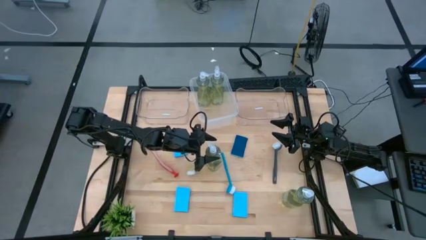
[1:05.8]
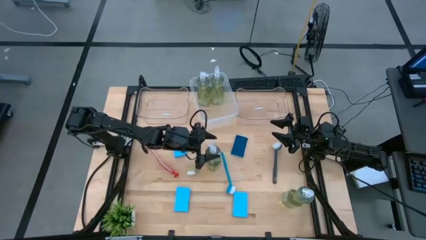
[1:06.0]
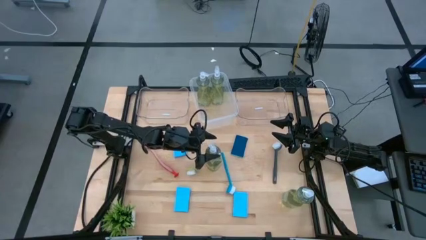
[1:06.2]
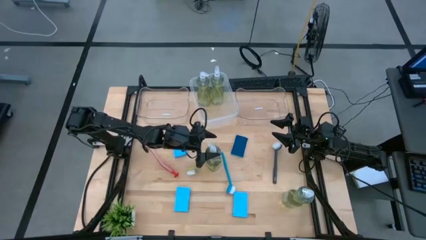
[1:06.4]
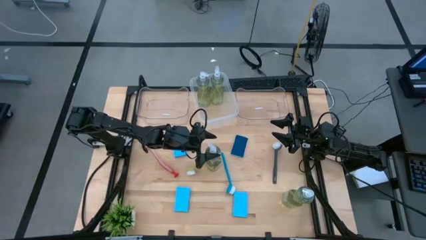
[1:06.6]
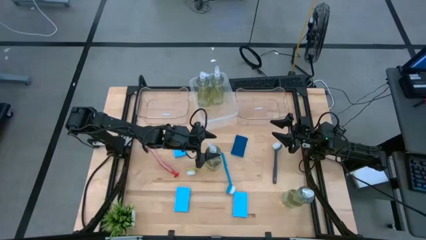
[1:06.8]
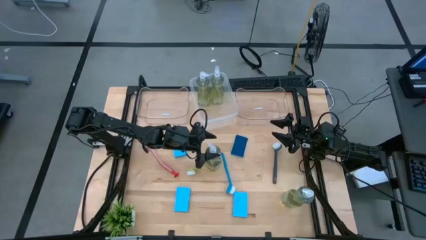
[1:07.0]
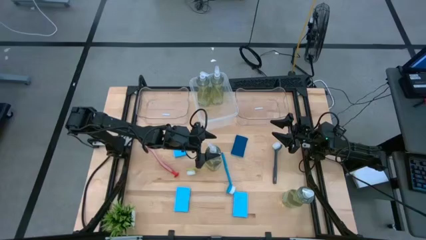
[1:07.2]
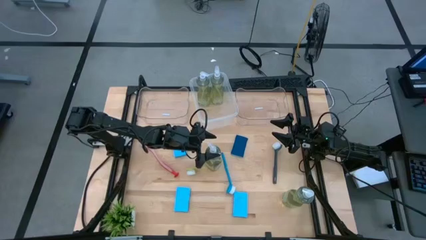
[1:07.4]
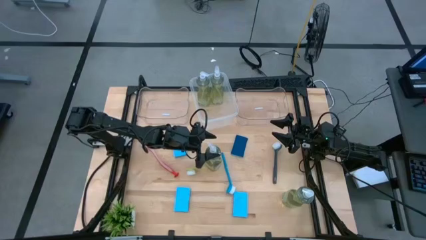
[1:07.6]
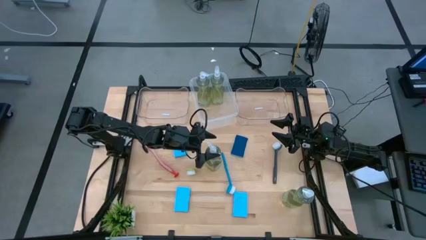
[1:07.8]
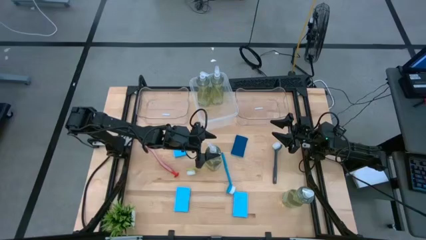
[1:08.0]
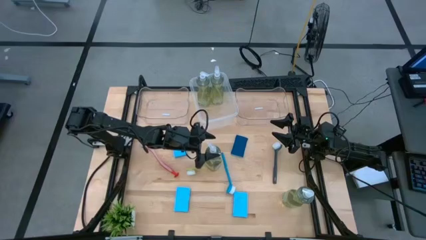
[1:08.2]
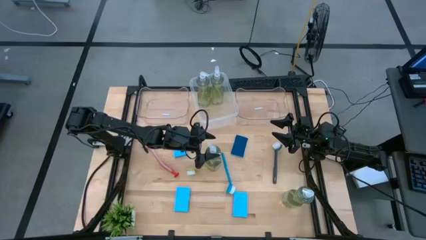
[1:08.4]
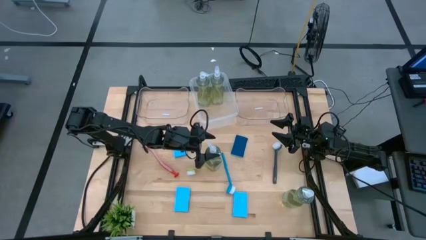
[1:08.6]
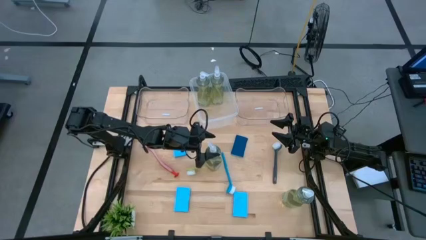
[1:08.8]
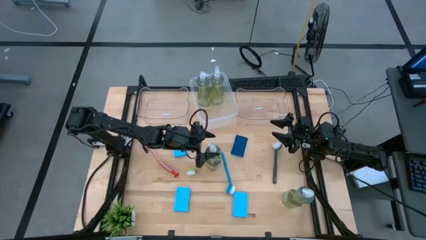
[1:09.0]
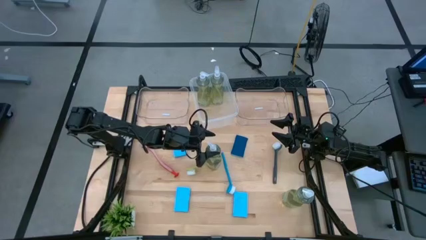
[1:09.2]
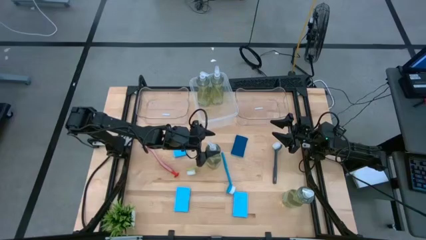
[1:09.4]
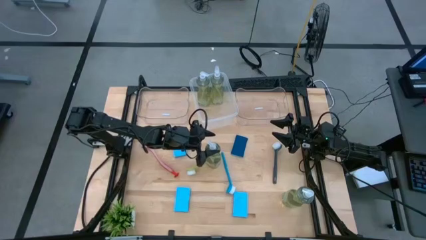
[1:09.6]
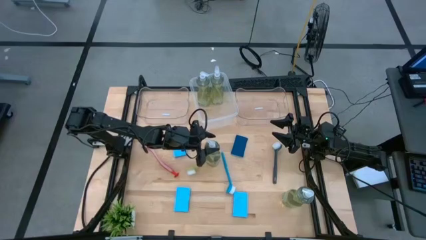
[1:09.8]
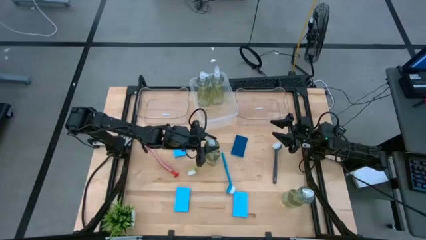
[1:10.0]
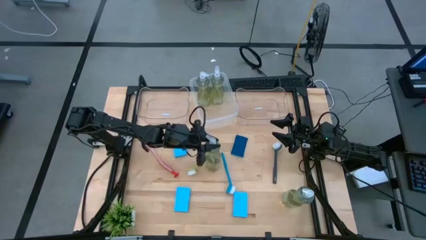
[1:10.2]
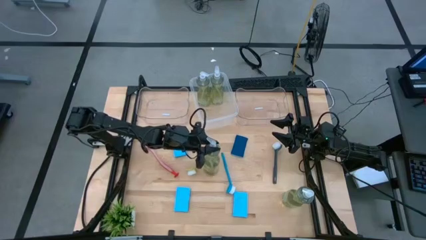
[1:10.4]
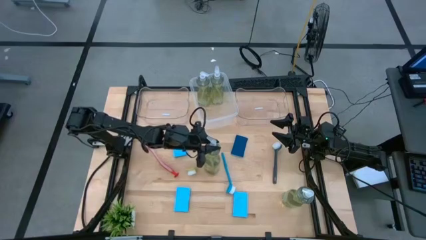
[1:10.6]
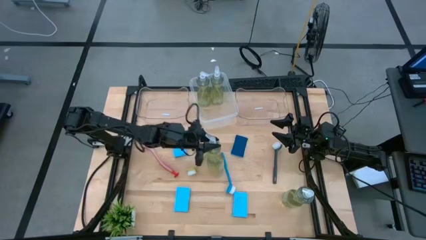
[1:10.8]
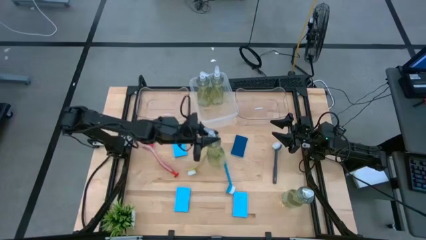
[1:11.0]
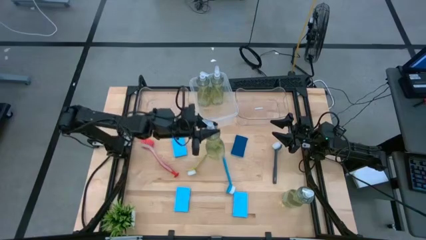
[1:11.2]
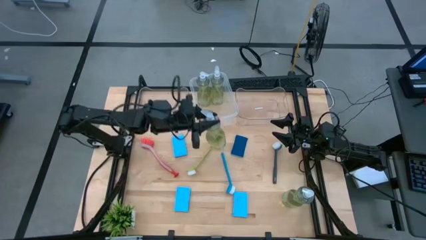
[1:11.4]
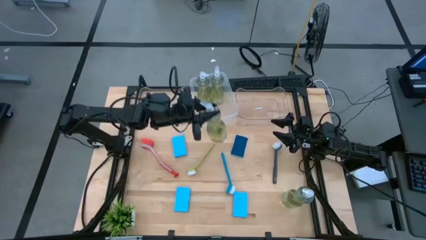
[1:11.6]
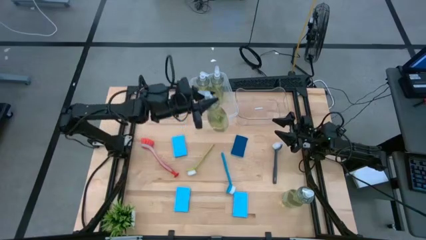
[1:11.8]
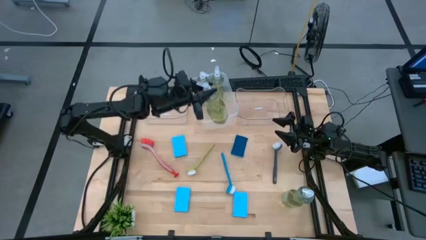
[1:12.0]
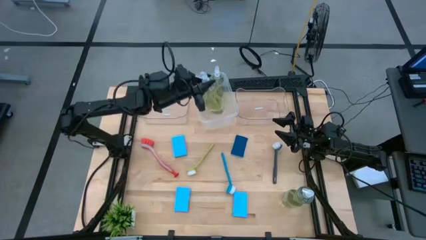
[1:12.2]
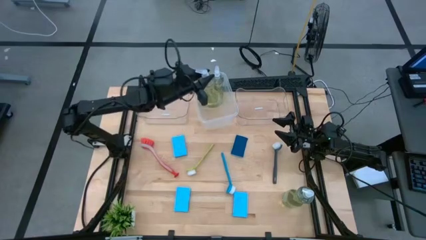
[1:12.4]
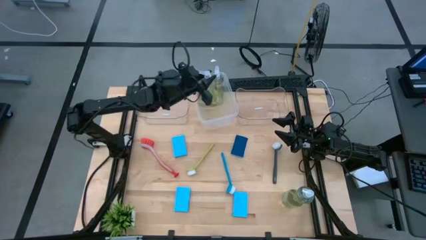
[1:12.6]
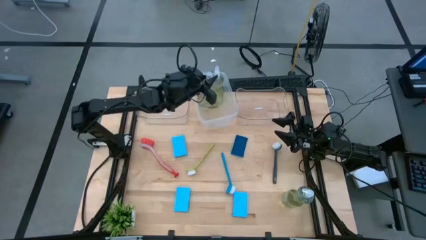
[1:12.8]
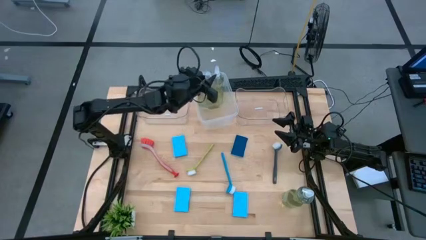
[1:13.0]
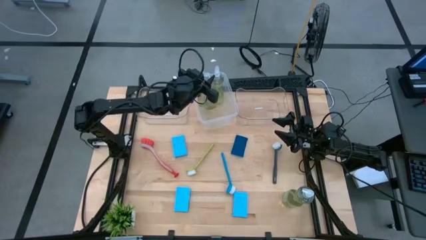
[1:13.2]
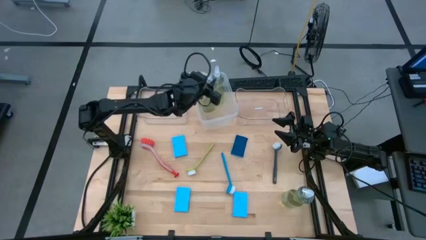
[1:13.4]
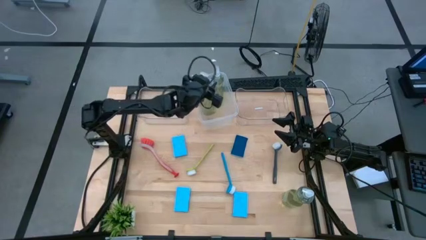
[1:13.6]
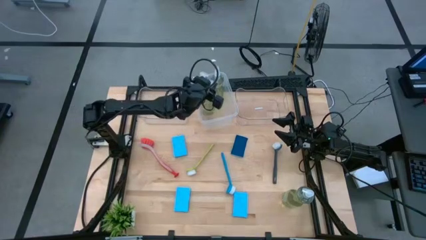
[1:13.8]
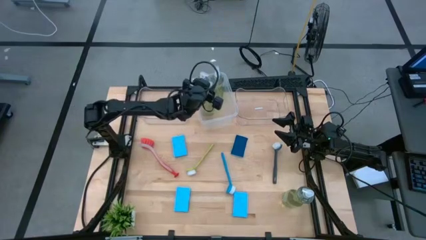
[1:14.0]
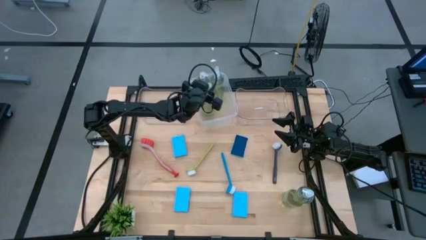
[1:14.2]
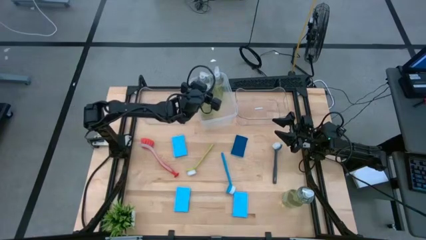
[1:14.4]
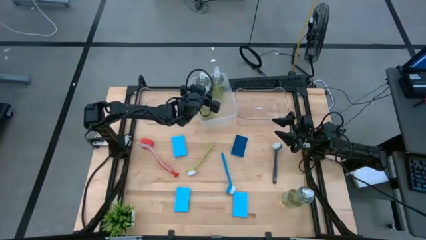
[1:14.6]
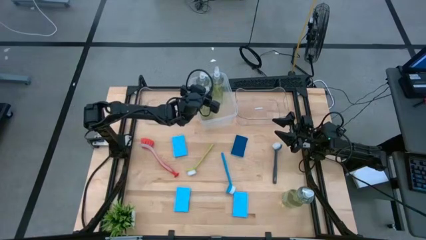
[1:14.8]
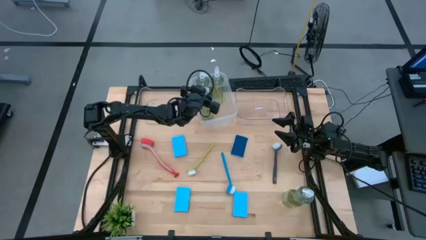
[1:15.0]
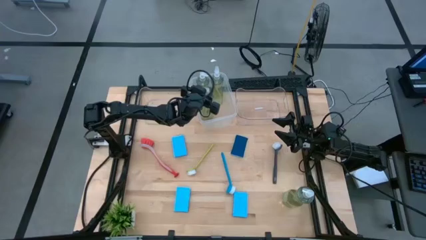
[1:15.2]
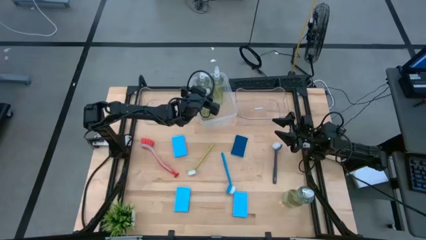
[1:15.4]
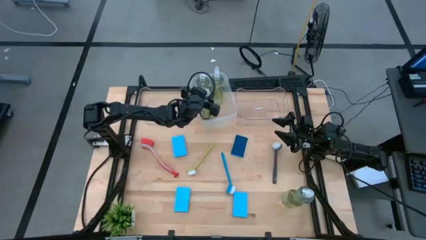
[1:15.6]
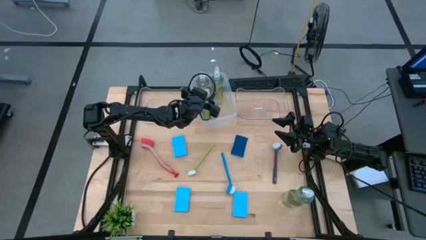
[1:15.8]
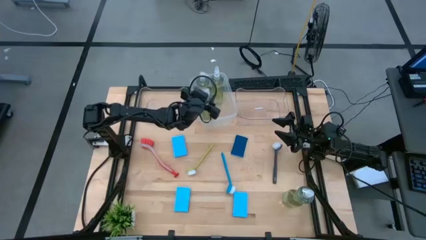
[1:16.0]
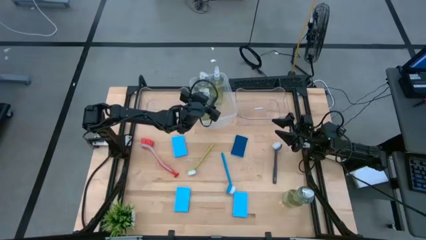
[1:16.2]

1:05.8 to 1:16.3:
Task: Pick & Place Kitchen Sink Supplies
Put the green soap dispenser into the transparent white bin

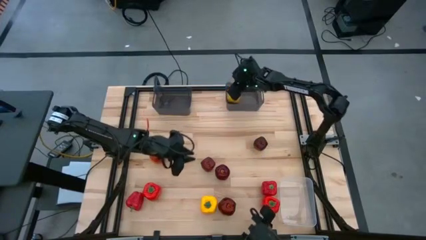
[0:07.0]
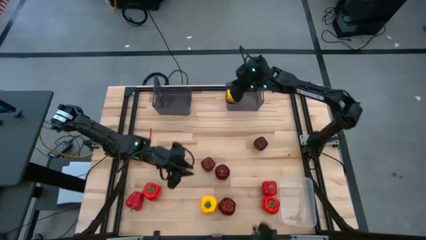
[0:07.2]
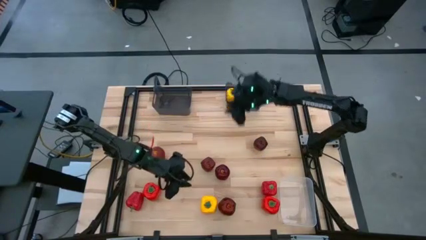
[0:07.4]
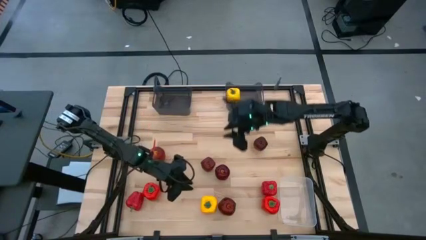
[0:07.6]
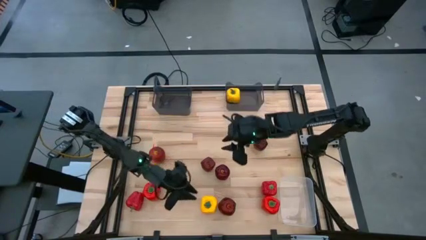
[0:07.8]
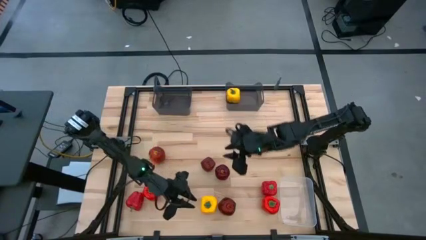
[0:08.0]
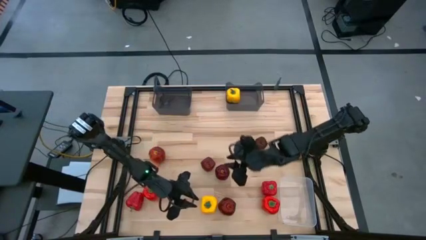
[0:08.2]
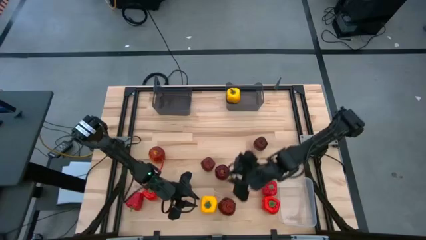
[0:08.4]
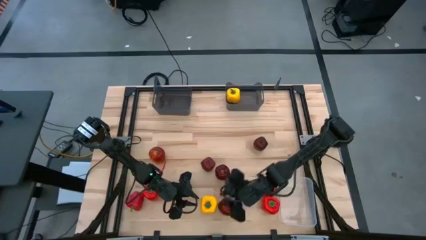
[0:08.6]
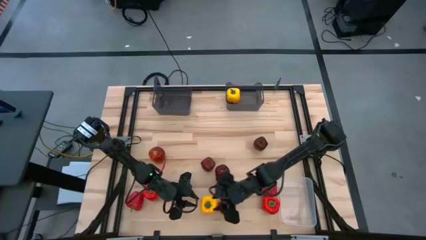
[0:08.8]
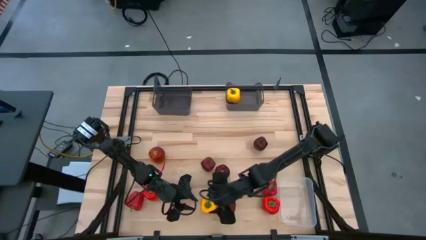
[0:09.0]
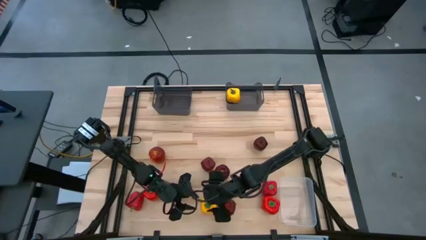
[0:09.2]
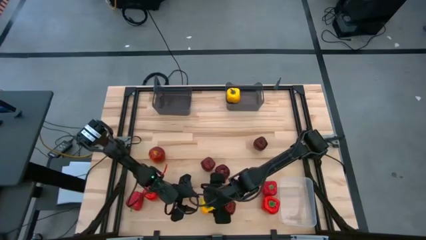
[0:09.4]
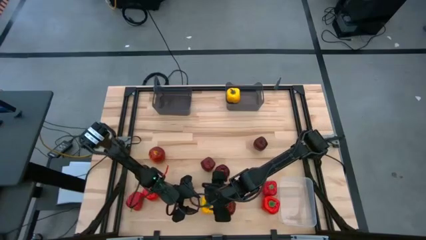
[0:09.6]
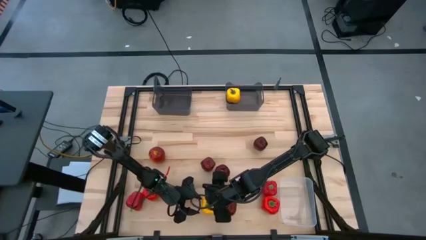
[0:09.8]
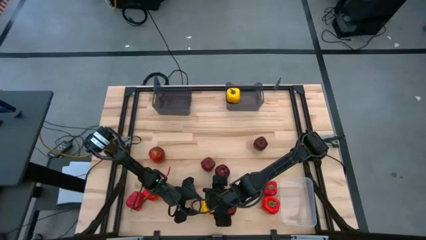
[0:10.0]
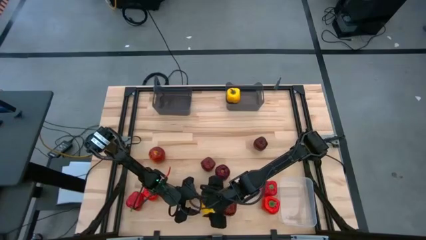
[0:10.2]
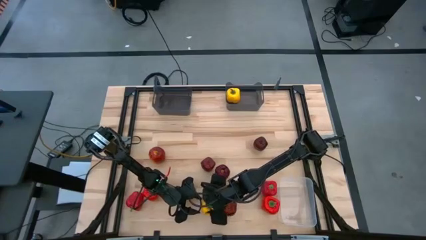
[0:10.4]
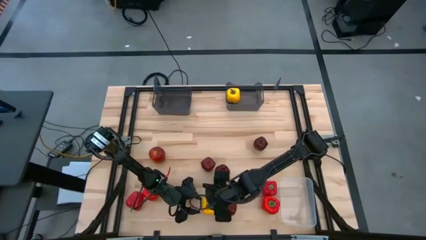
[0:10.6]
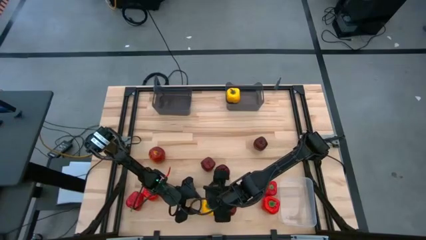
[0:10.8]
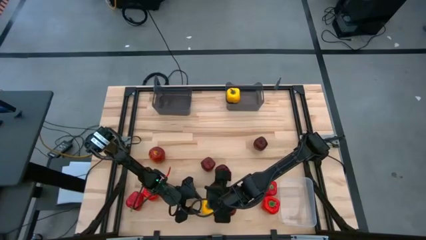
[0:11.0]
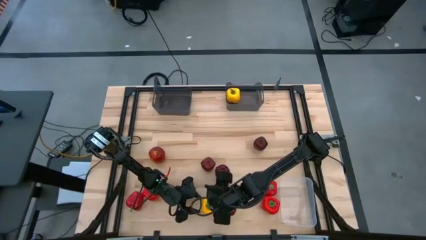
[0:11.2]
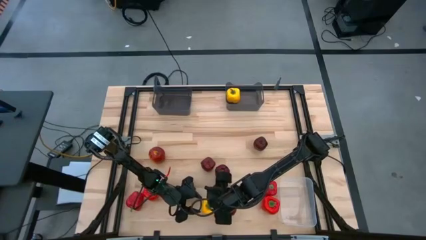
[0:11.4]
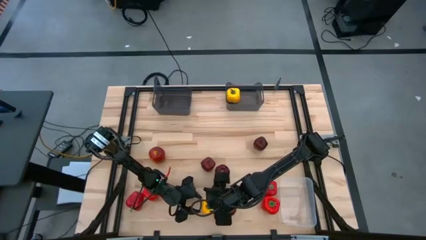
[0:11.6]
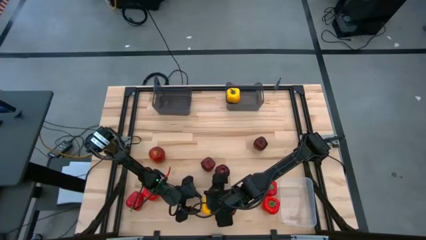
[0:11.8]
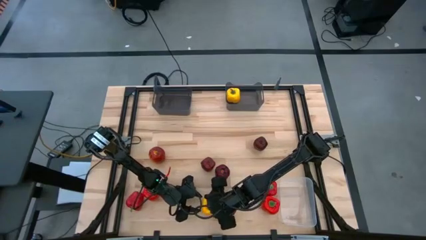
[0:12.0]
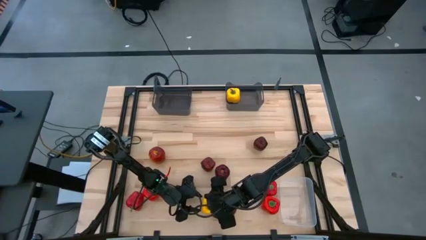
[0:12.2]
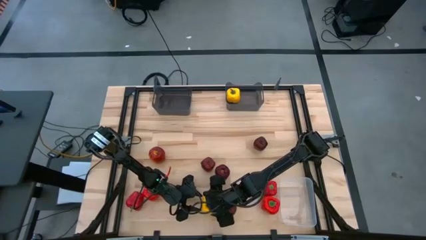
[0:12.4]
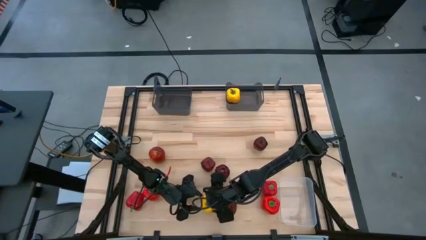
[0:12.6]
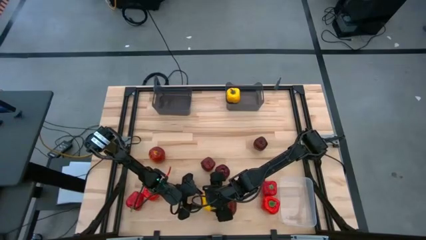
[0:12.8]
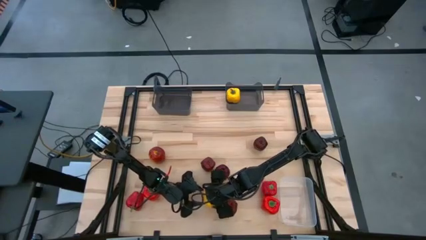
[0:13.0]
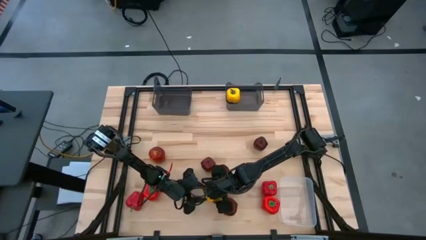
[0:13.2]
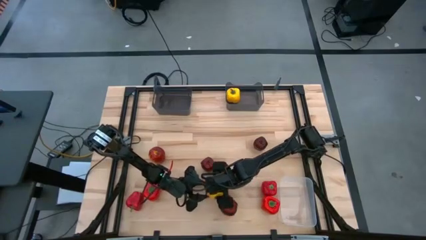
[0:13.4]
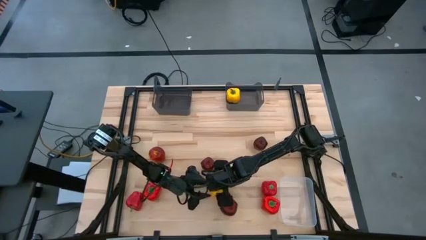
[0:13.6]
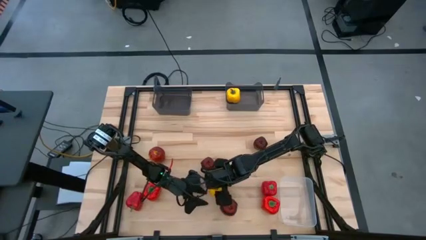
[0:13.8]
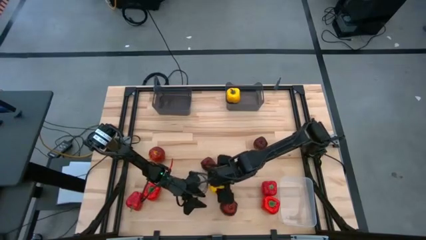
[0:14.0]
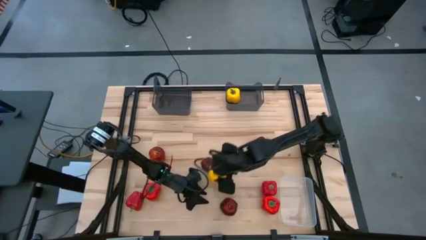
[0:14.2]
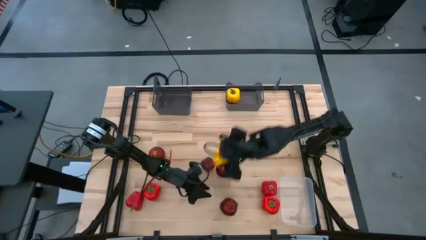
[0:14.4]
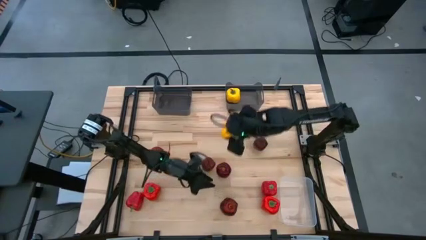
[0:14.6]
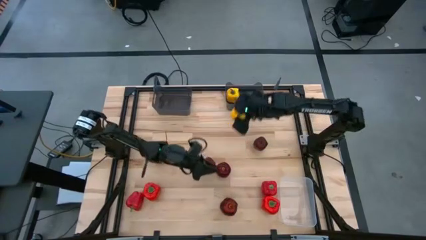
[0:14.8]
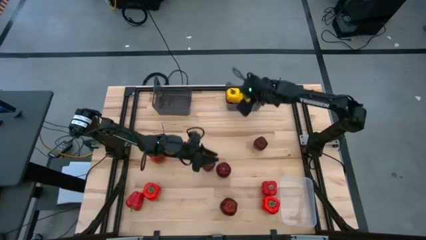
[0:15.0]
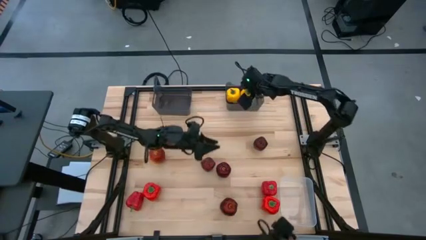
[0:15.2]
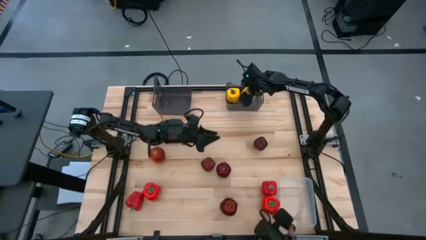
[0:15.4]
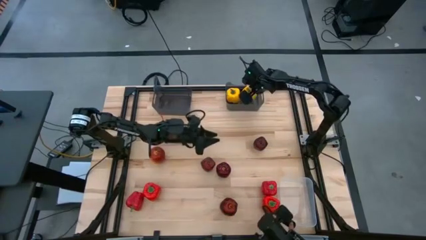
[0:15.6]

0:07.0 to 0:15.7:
Task: Sort produce into baskets
Put the yellow bell pepper into the right black bin
